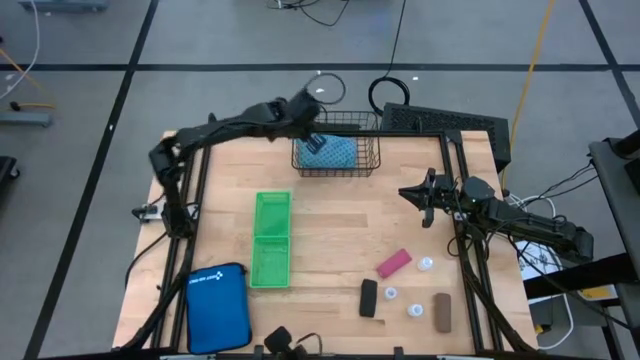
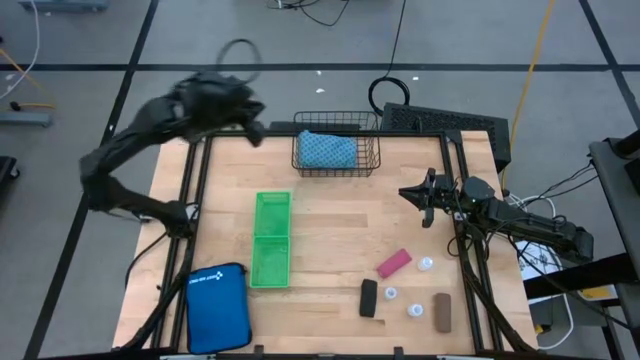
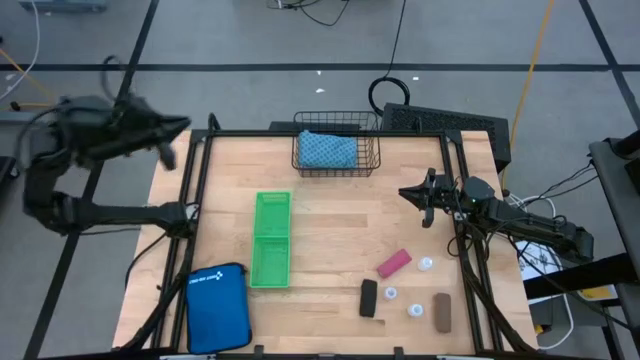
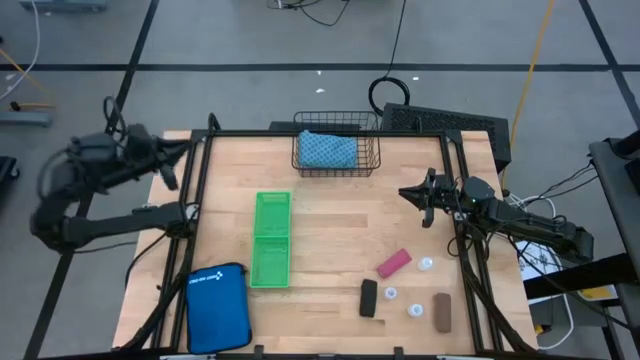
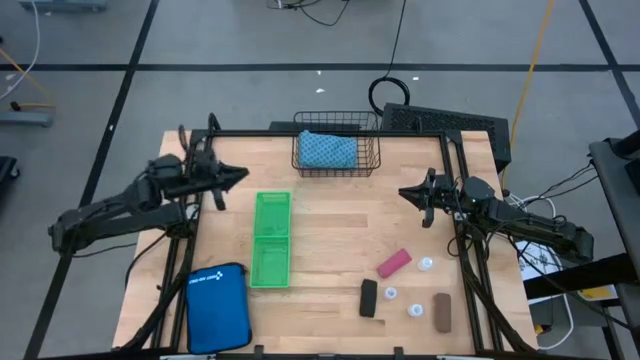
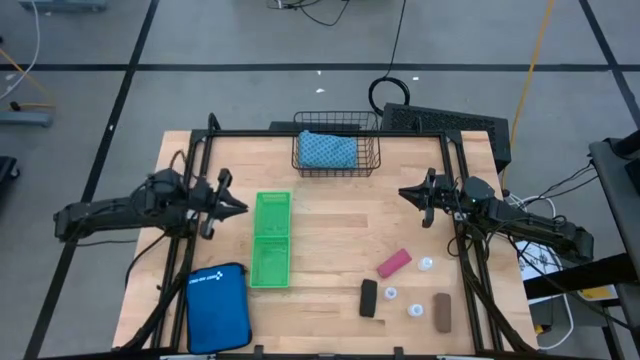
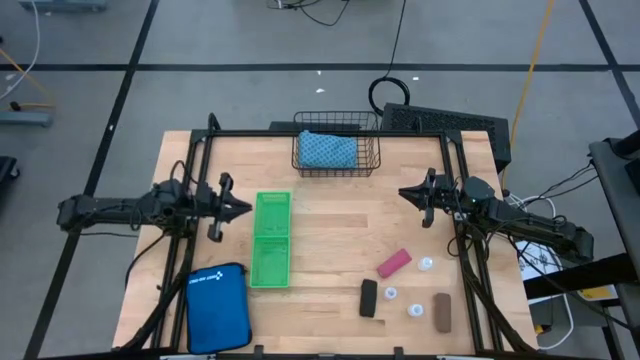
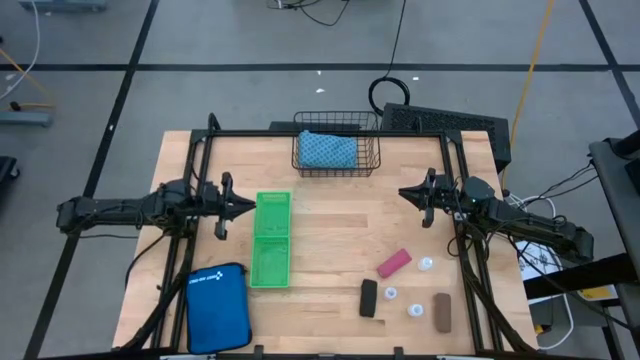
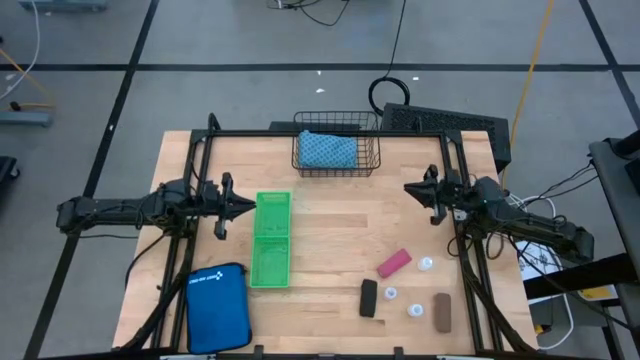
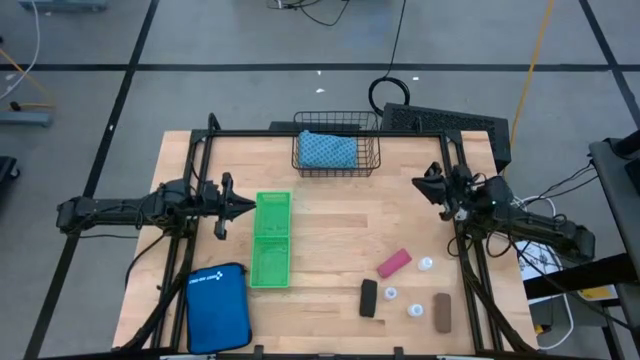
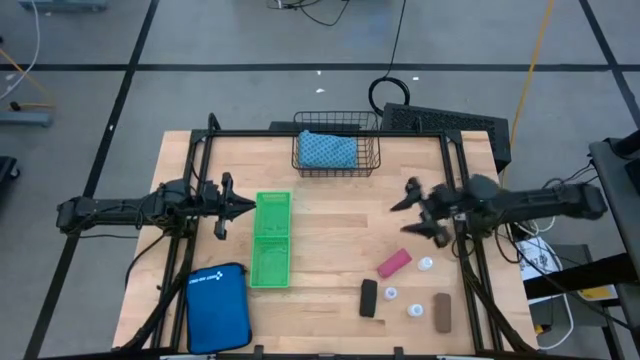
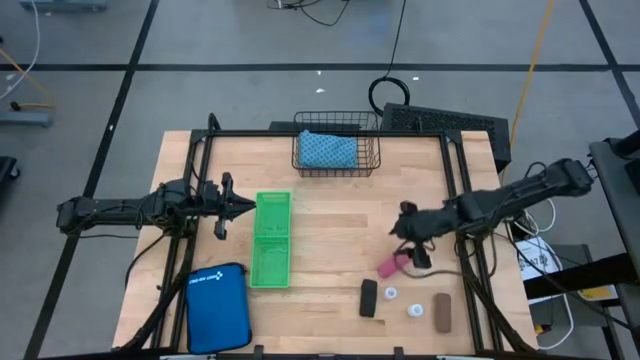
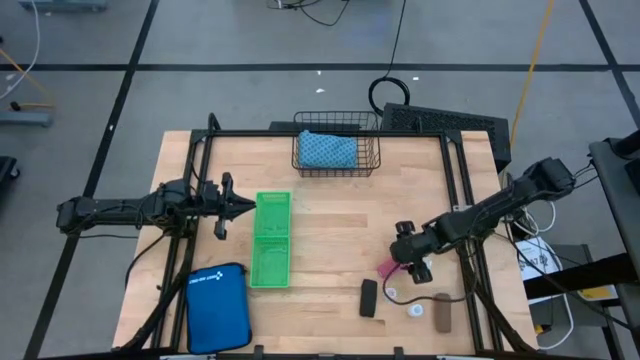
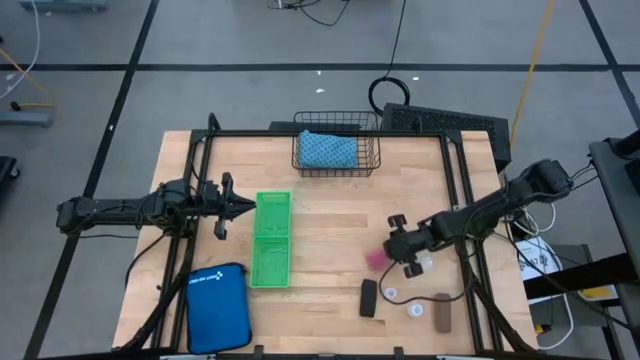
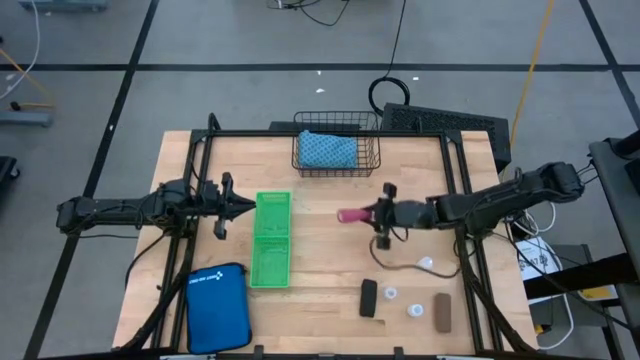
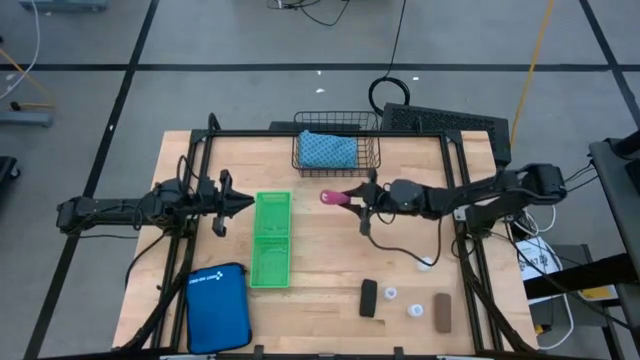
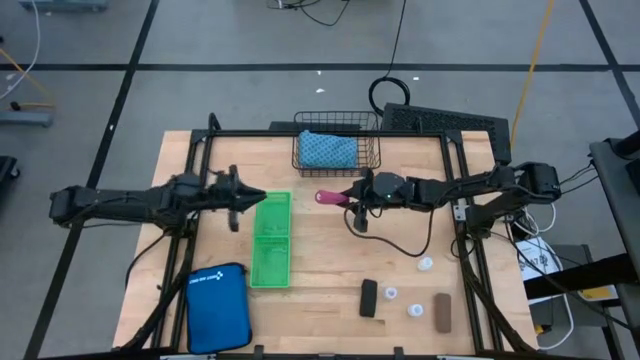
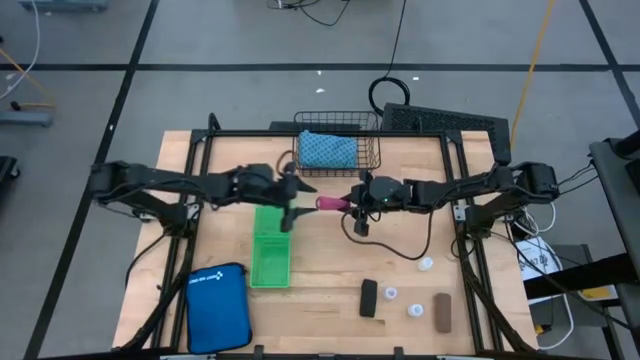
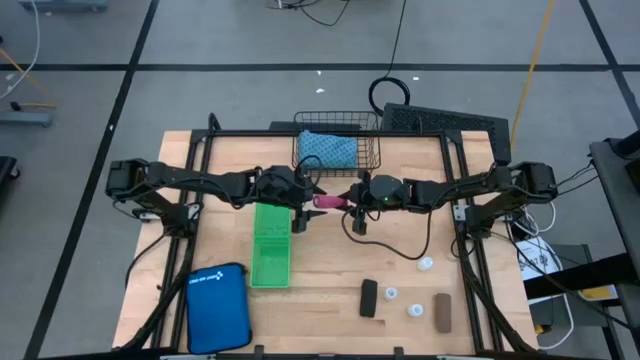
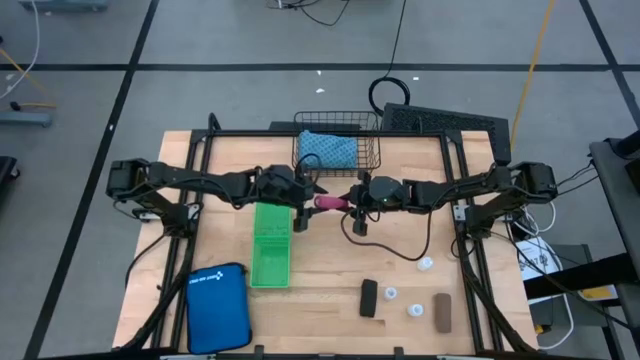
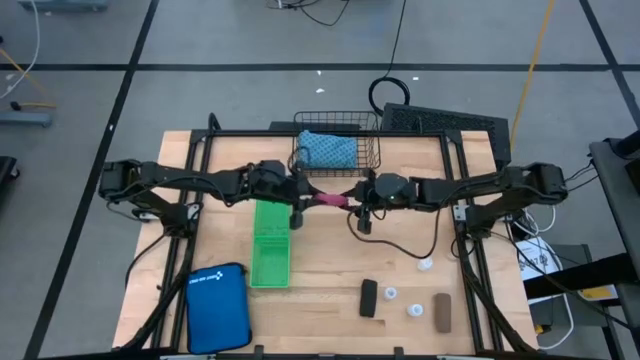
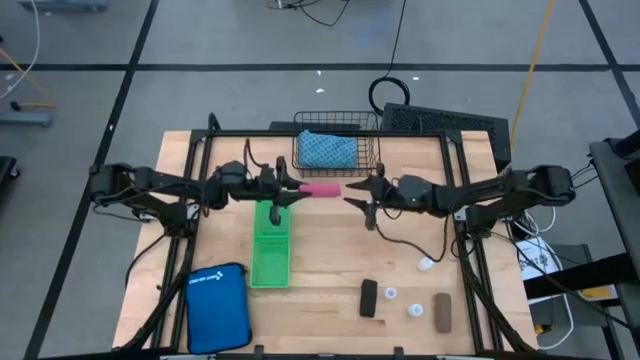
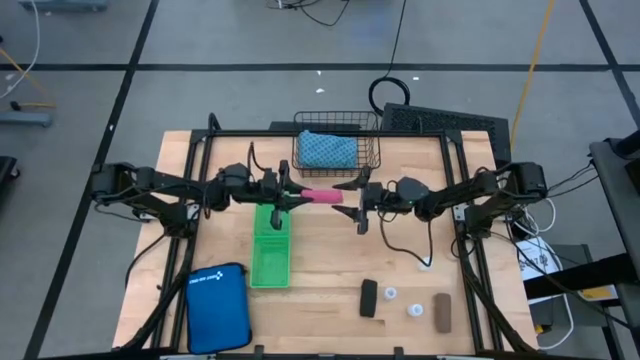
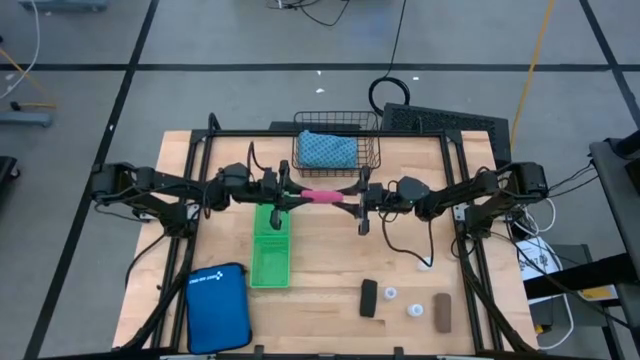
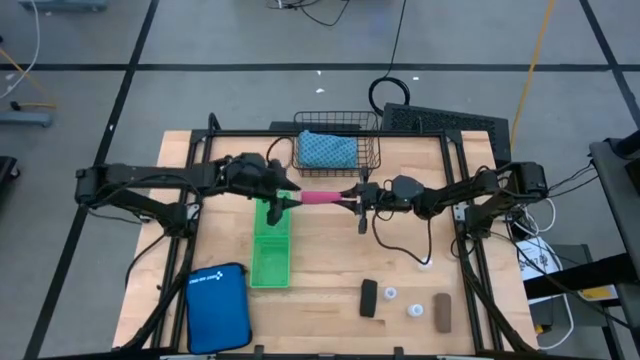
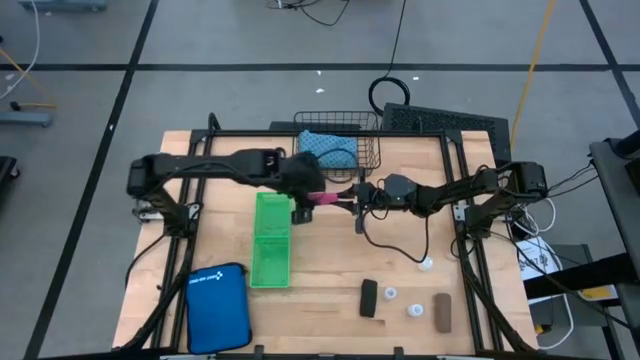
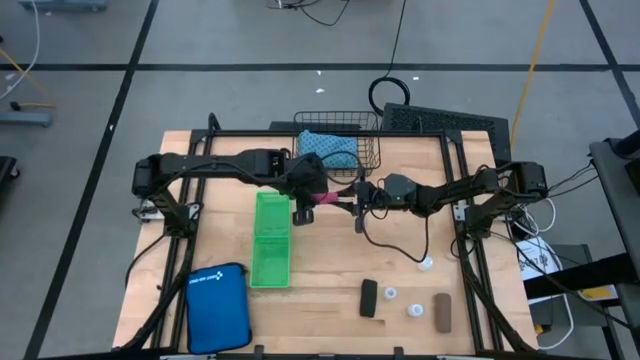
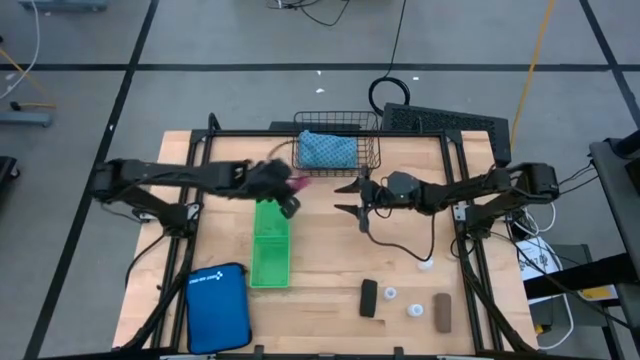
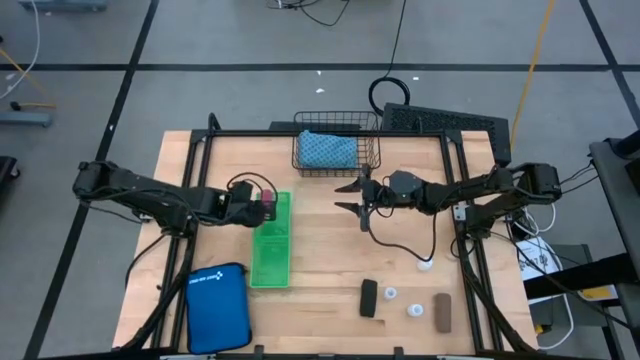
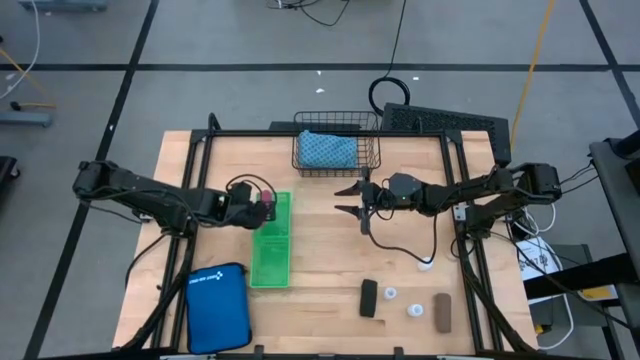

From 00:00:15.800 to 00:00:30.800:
Task: Pick & Place Medicine items
Put the pink bandage into the top green bin

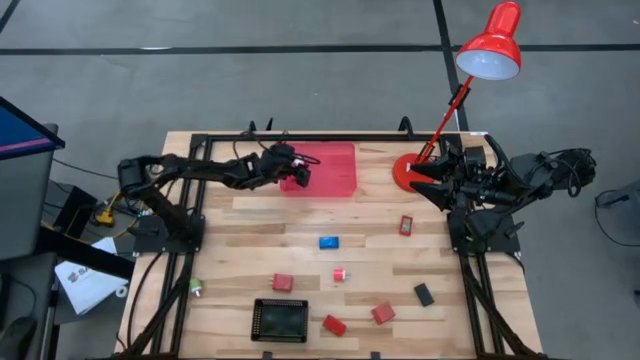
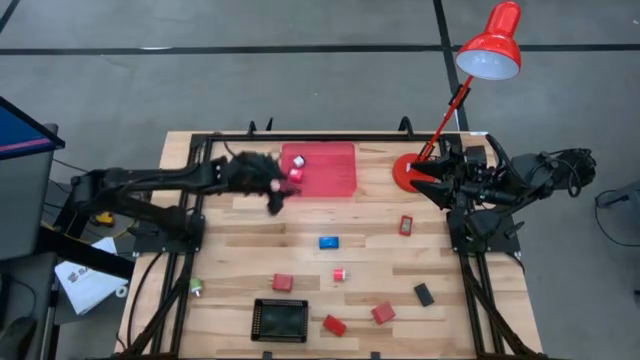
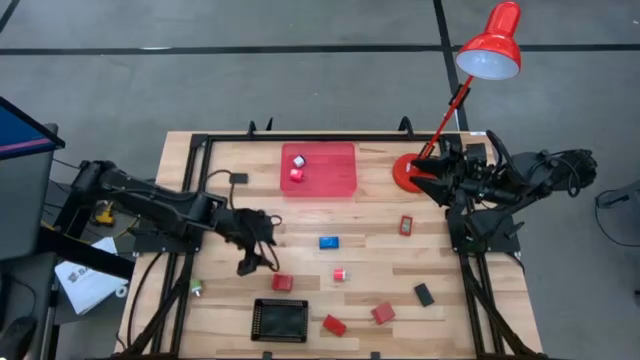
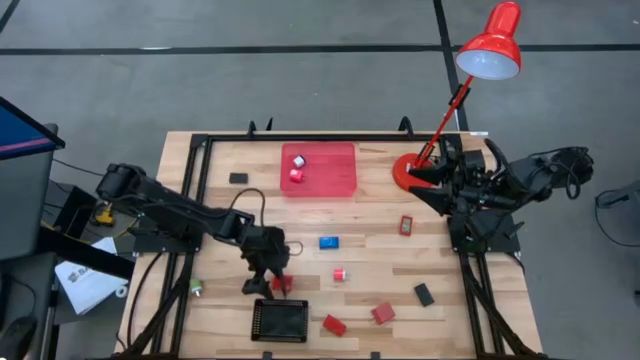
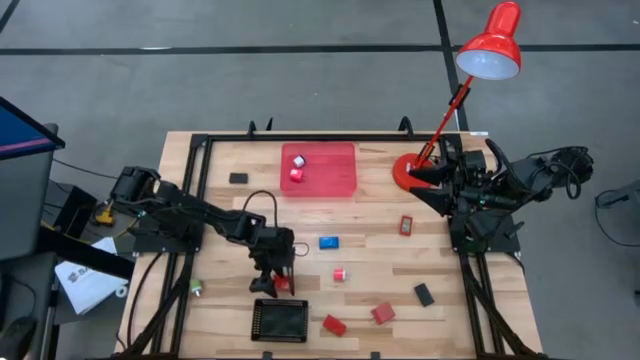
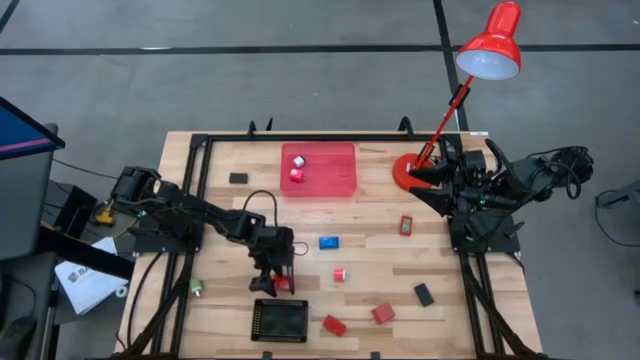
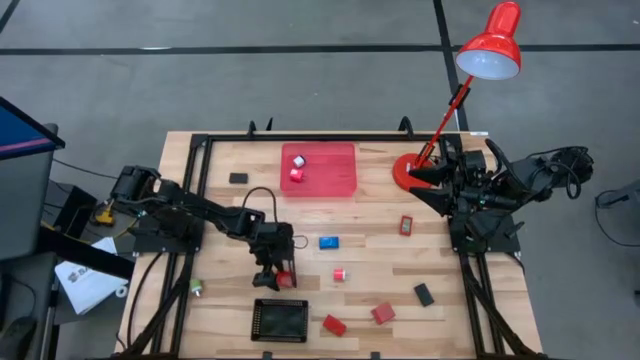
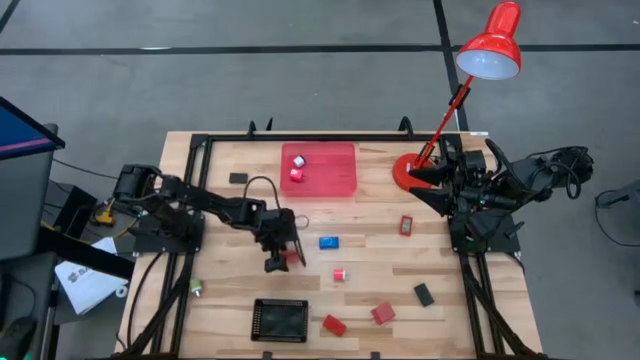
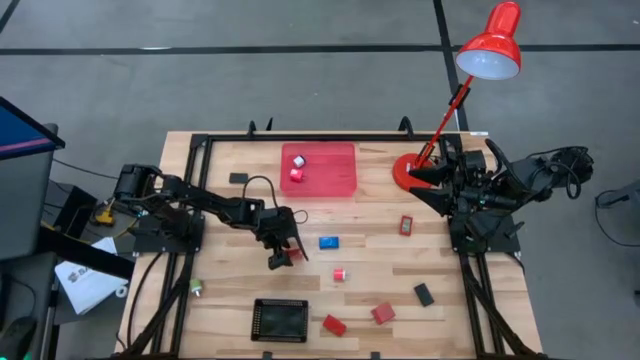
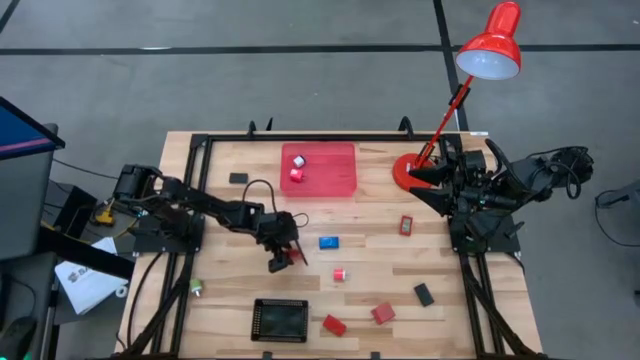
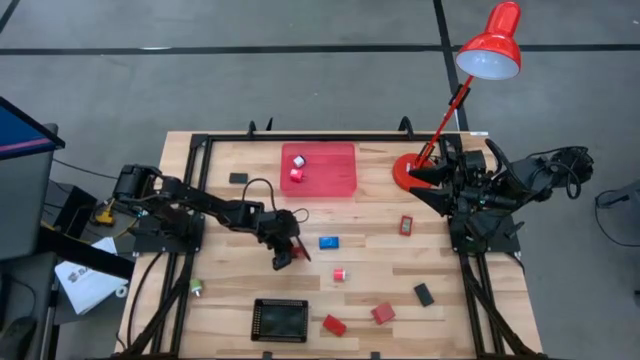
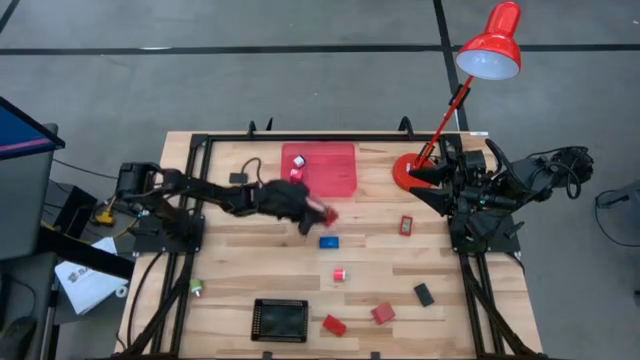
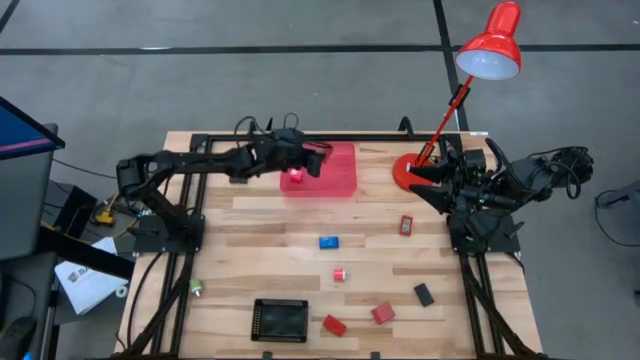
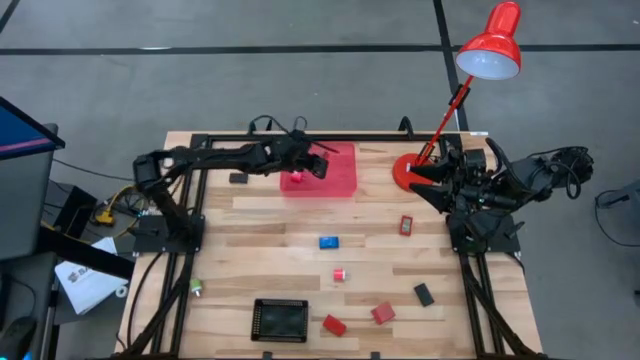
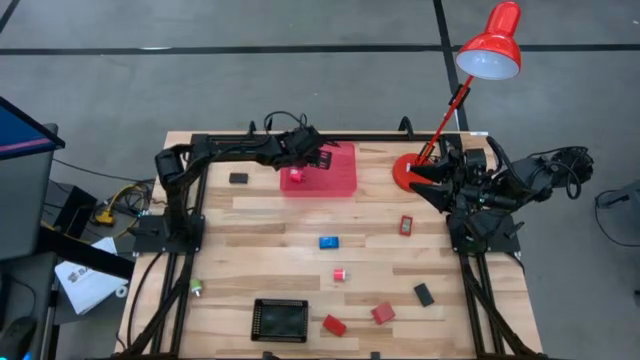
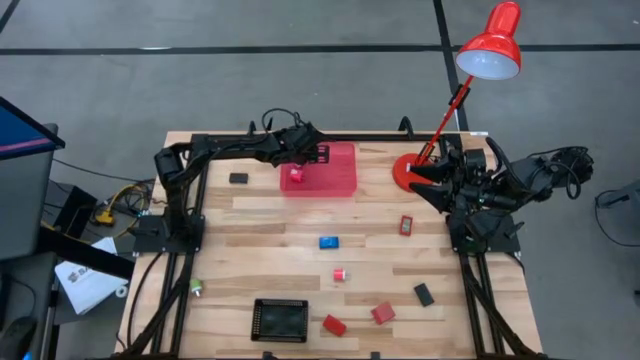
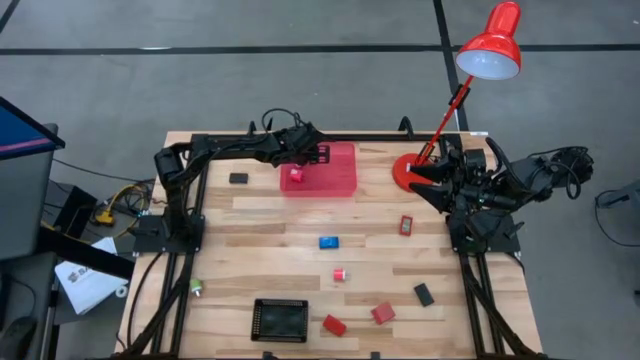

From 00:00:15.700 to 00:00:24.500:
Task: Pick & Place Office items
Put the left red charger adapter into the pink bin
